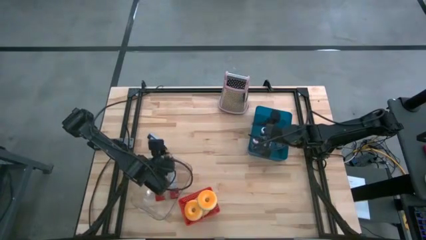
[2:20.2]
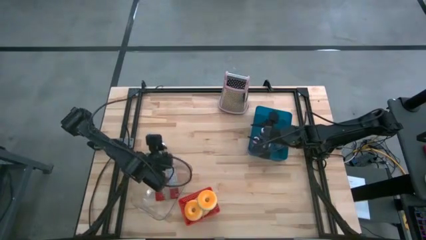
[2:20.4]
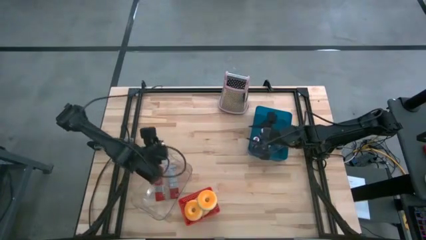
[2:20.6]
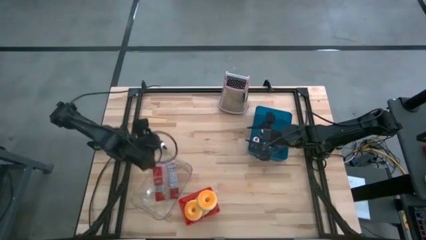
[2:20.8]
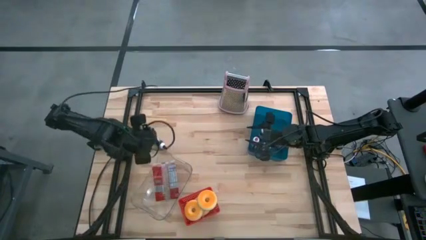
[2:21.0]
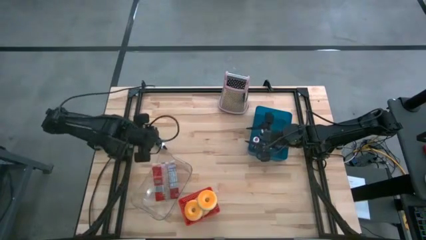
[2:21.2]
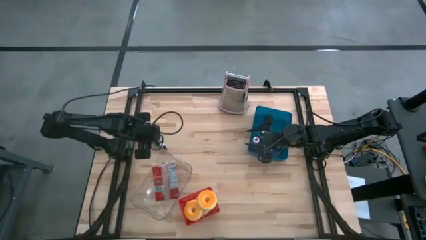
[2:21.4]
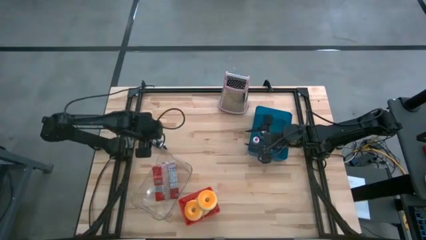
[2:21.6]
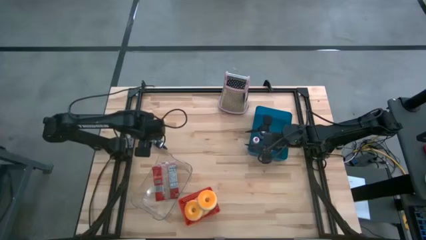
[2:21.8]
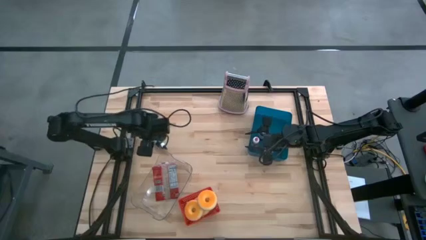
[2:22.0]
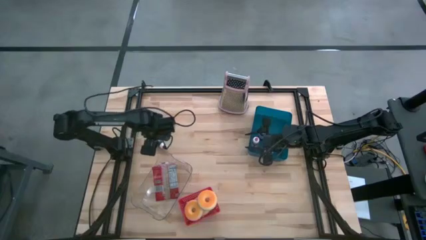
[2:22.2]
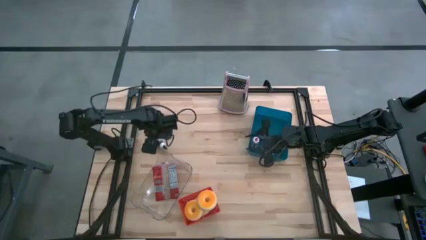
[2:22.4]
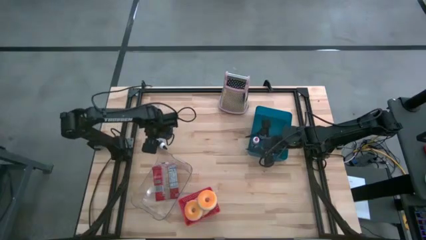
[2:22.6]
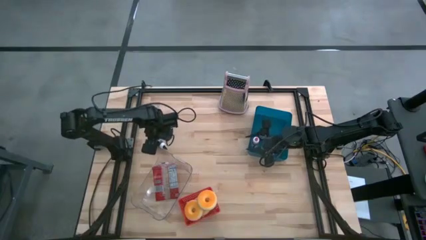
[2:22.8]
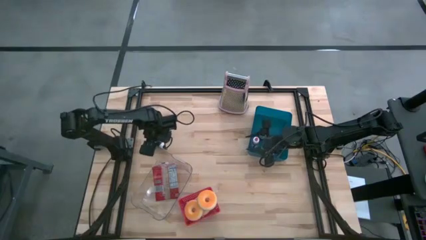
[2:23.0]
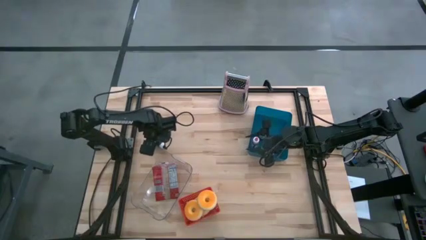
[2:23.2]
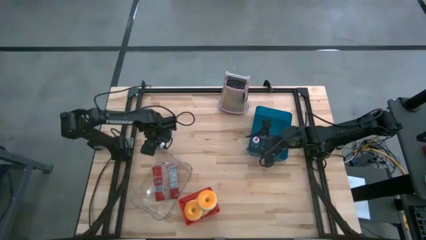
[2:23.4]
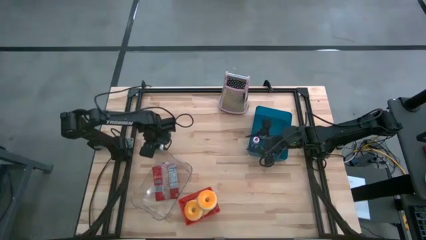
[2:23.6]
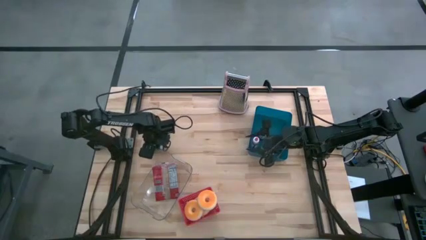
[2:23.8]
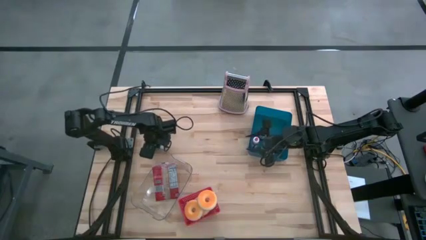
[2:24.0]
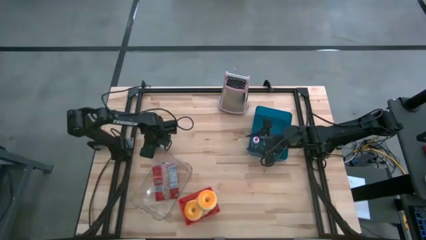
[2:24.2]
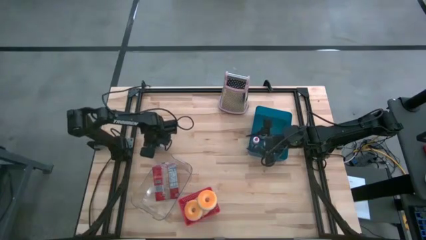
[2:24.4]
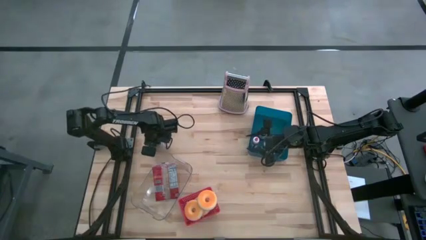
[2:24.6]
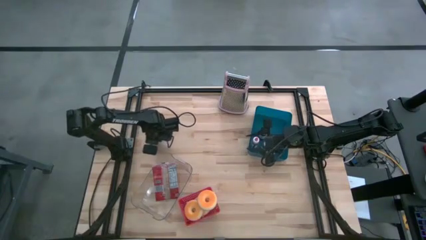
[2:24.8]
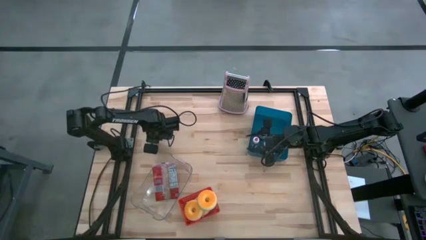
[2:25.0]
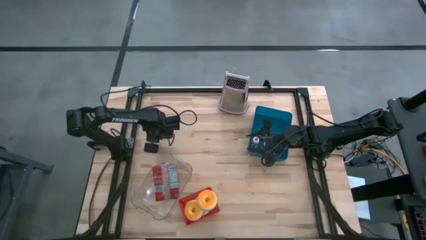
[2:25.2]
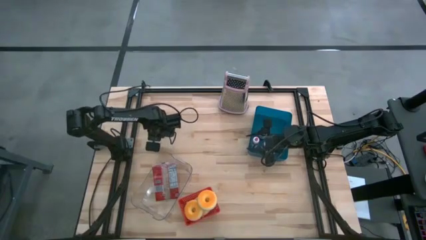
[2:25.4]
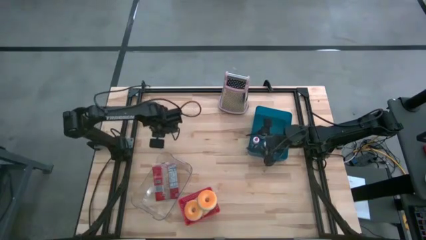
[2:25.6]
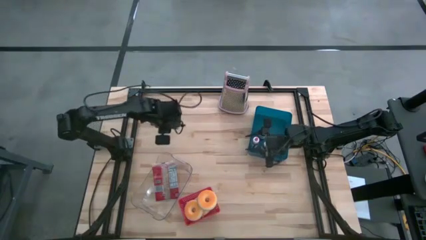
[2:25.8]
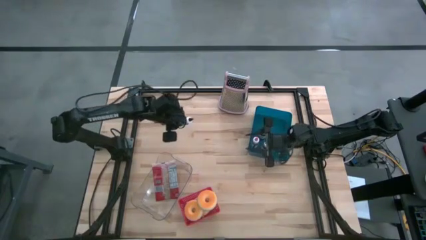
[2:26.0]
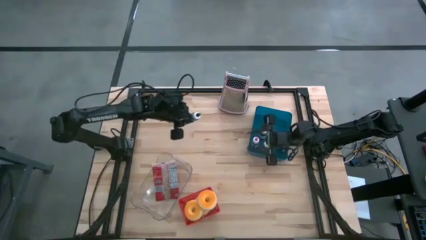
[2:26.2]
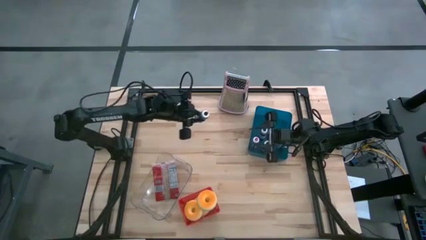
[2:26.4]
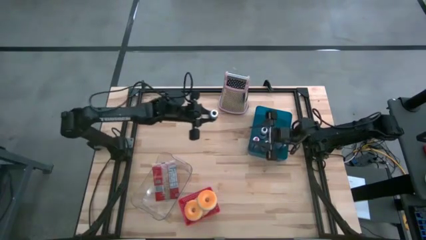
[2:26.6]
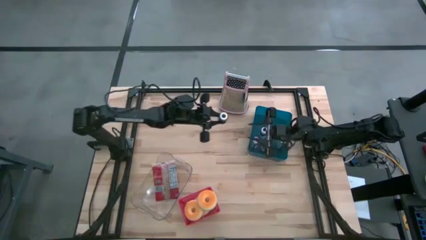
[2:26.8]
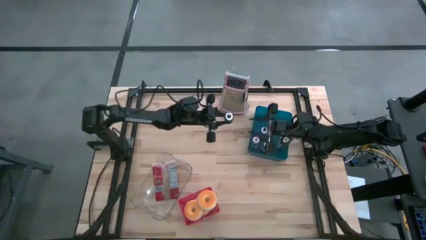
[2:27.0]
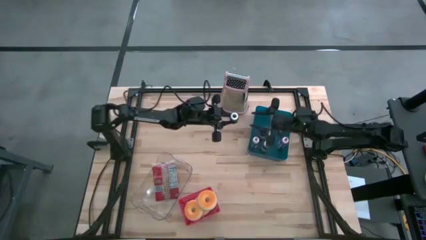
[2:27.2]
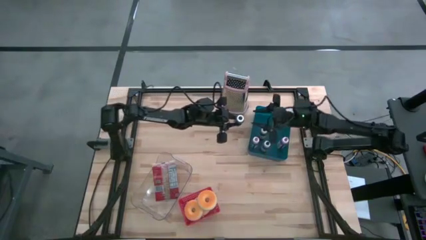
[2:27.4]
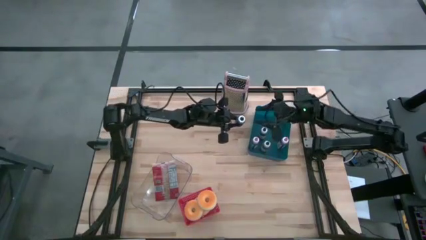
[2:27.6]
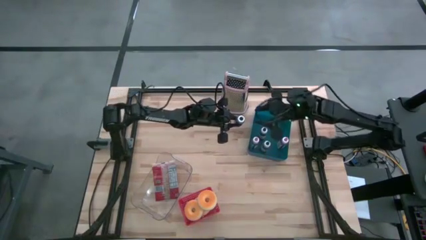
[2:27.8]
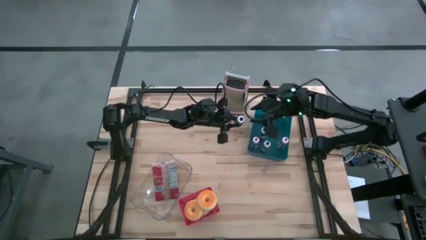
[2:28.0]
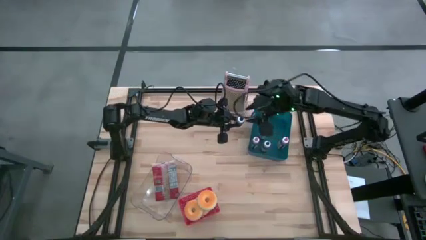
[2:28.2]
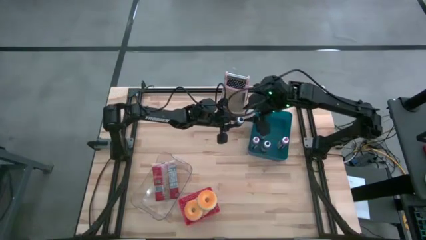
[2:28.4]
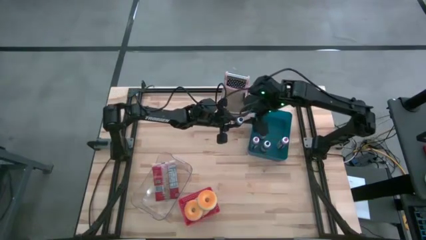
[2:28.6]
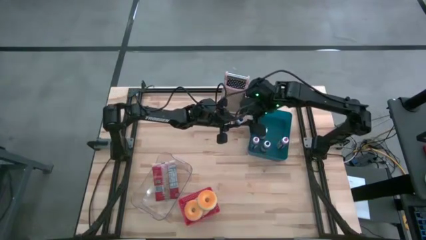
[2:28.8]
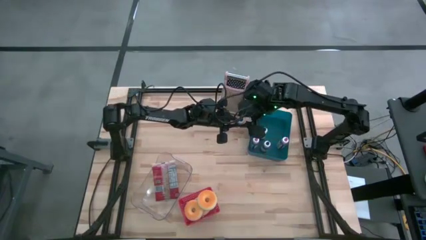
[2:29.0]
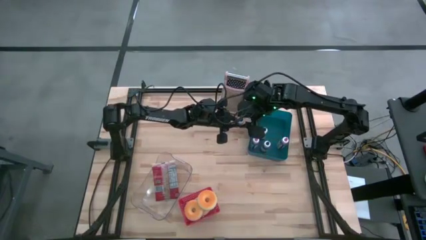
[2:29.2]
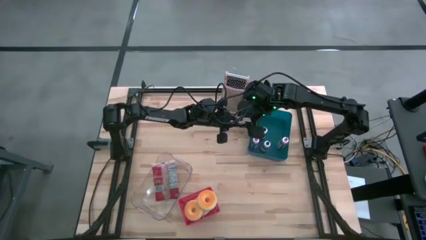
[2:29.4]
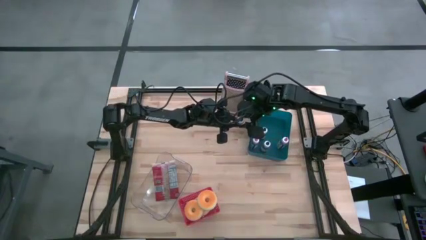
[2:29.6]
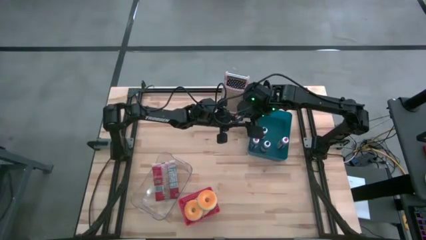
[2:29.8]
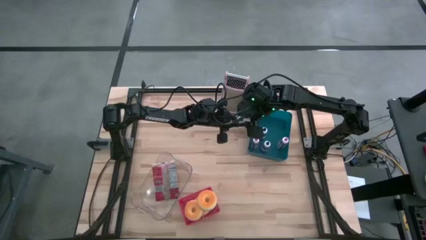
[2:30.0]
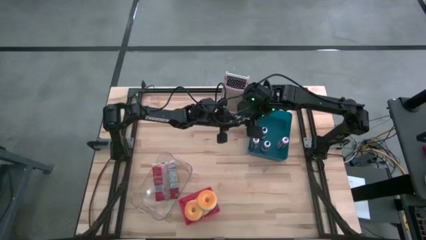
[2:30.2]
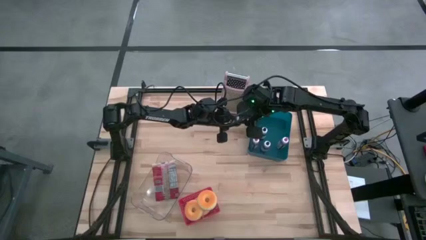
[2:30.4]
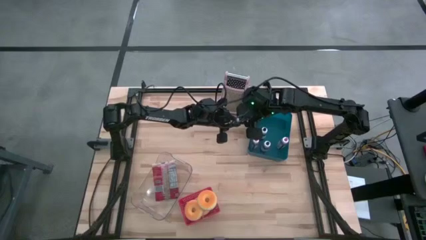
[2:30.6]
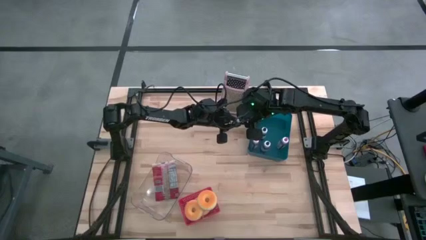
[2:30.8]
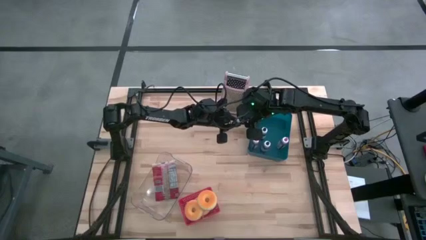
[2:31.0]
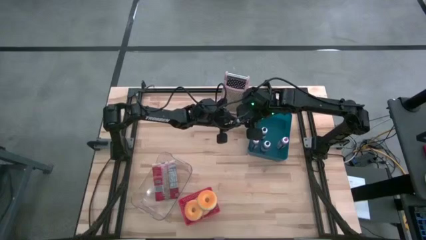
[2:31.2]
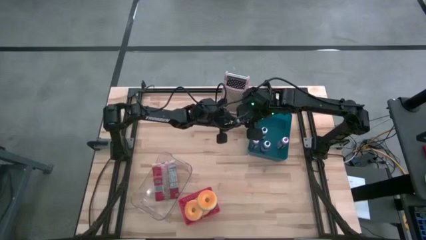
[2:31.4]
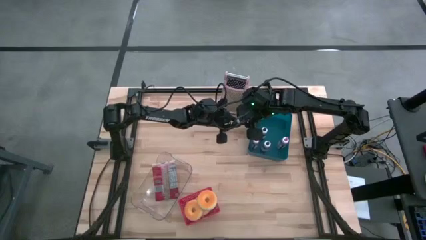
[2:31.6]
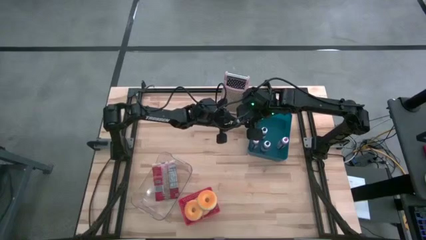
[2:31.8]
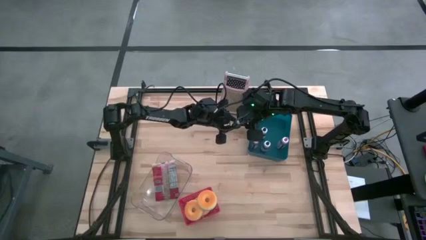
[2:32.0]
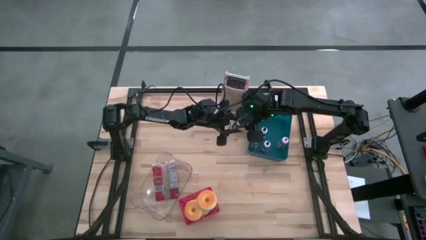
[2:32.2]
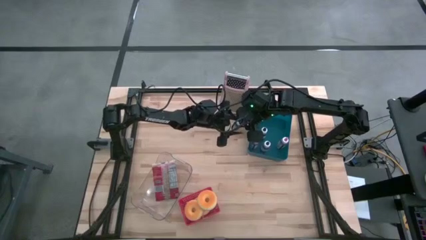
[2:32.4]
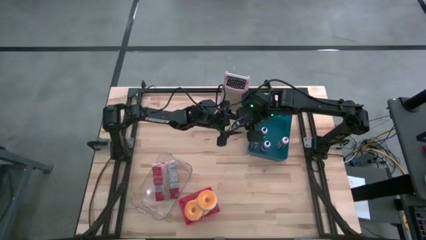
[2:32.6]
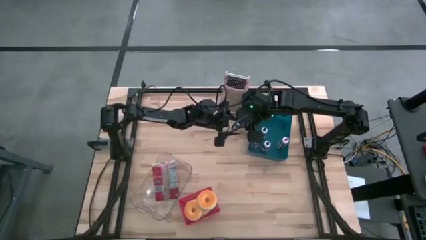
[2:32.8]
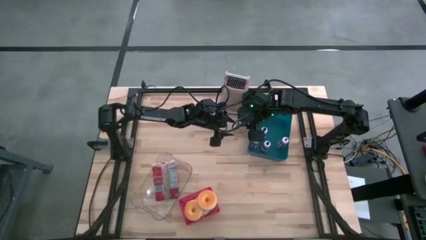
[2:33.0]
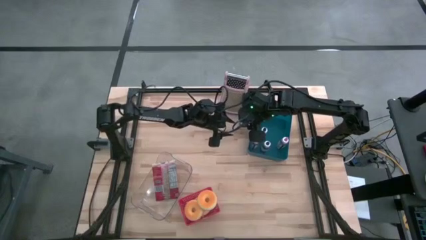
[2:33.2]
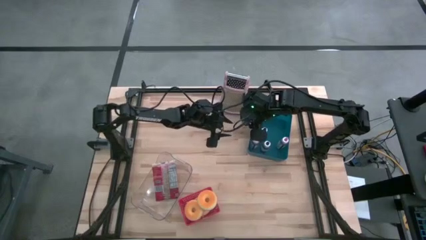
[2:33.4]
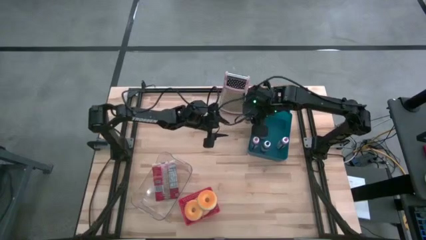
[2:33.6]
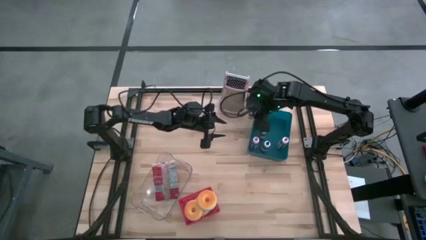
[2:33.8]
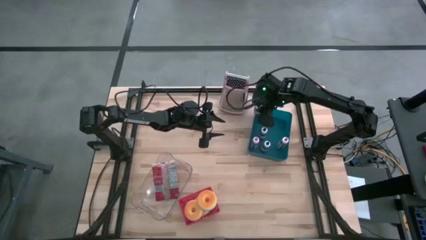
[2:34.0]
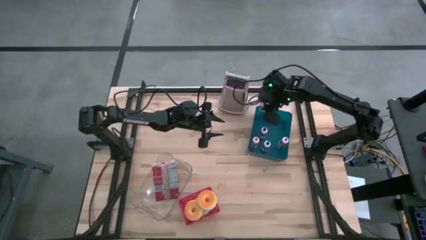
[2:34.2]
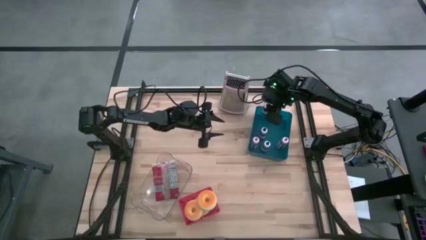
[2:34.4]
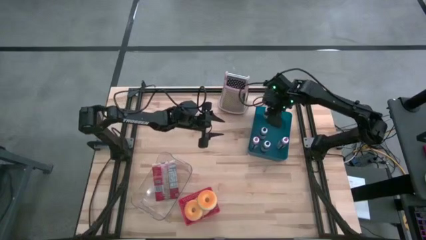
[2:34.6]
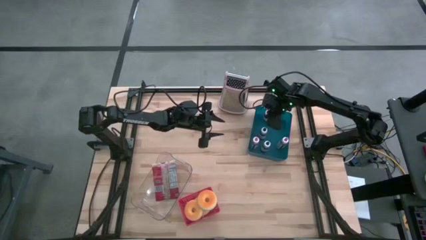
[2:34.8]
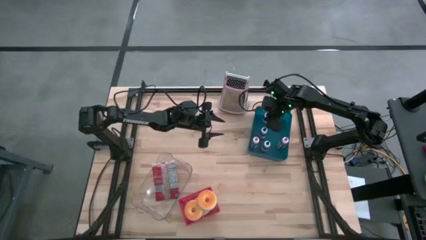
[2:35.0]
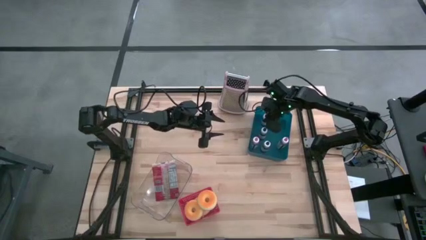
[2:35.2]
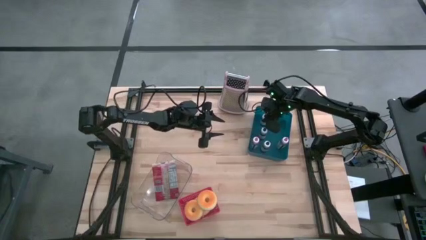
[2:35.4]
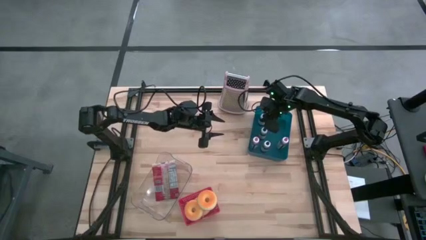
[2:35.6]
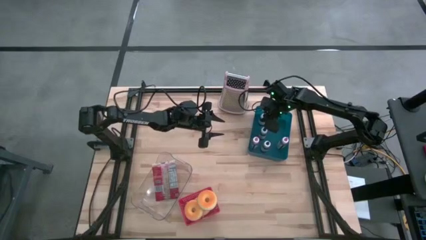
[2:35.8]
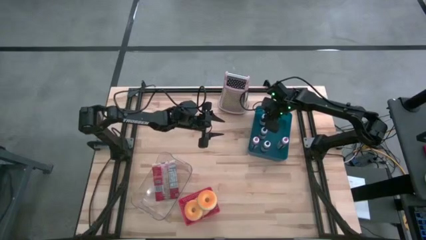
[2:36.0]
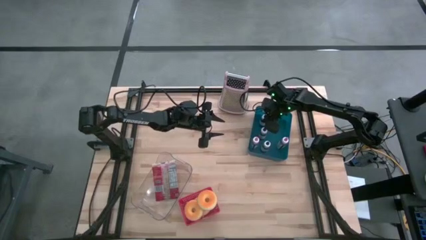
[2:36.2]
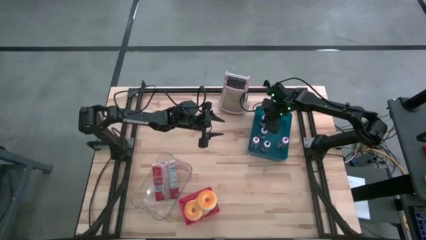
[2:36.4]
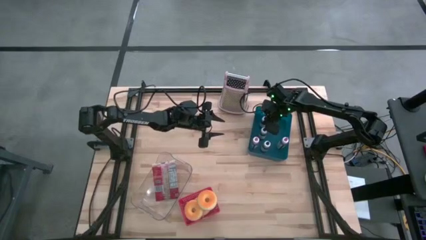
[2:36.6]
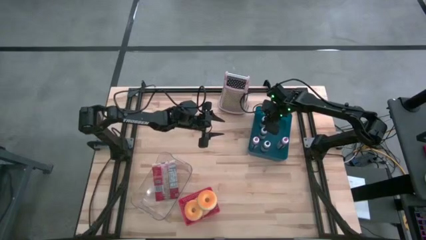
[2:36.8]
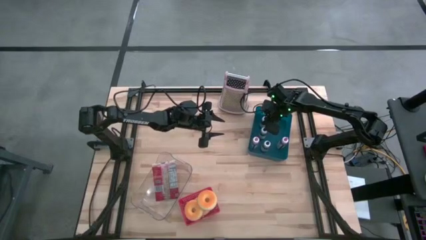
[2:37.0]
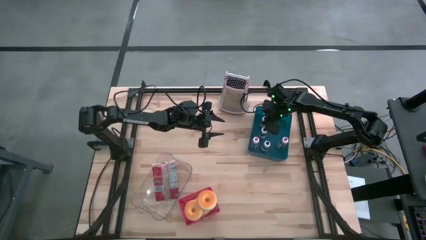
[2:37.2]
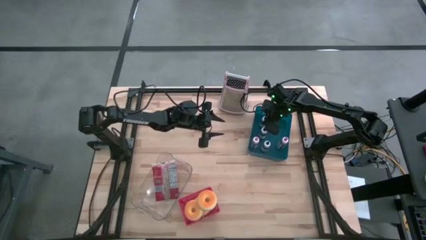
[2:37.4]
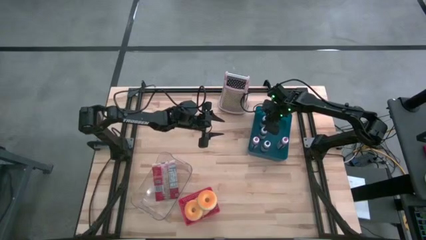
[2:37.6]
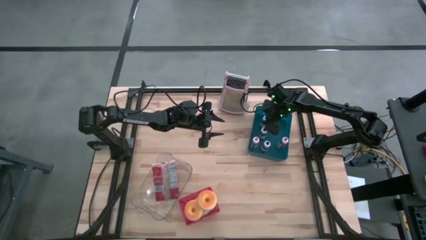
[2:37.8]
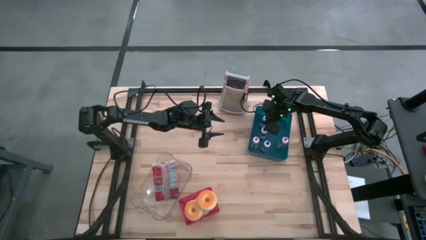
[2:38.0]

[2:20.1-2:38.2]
Task: Pick & Place Food Item
Put the black food coloring bottle into the blue bin
